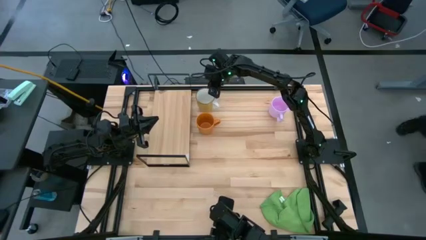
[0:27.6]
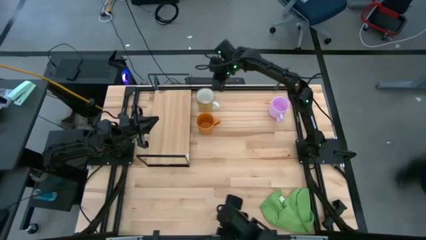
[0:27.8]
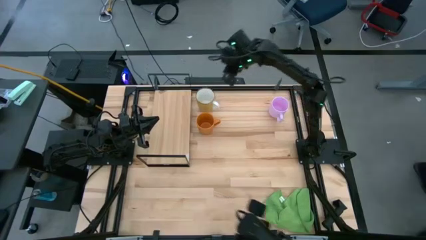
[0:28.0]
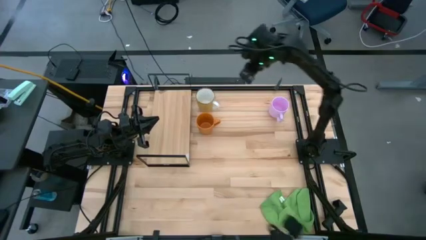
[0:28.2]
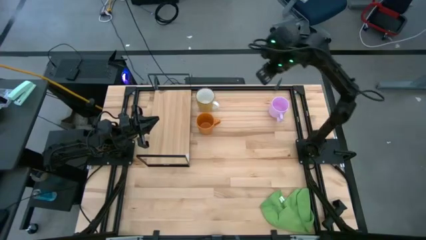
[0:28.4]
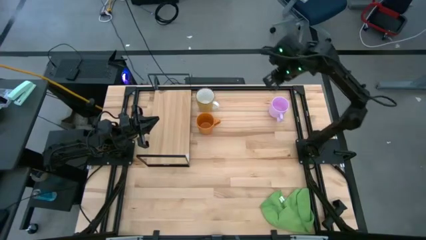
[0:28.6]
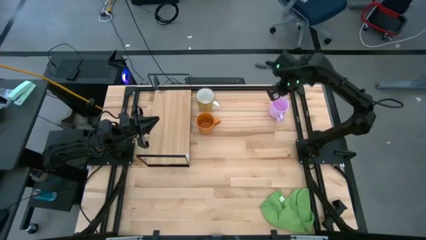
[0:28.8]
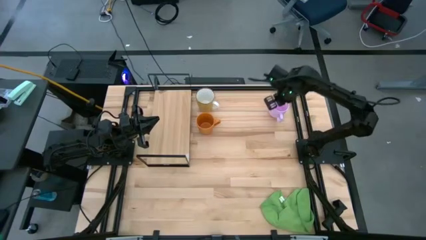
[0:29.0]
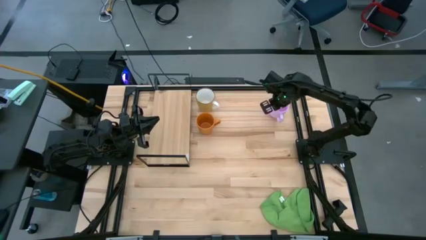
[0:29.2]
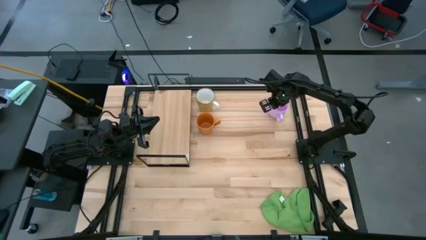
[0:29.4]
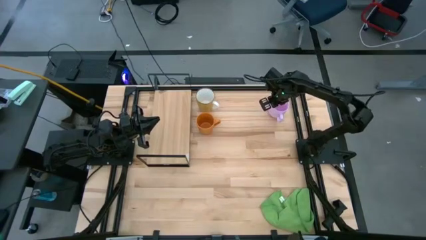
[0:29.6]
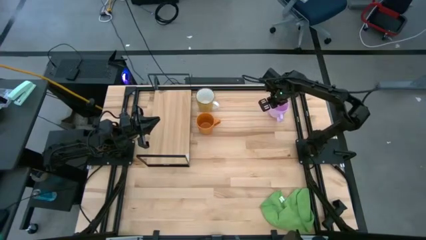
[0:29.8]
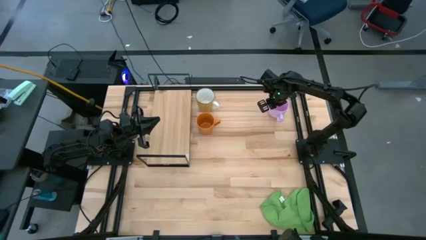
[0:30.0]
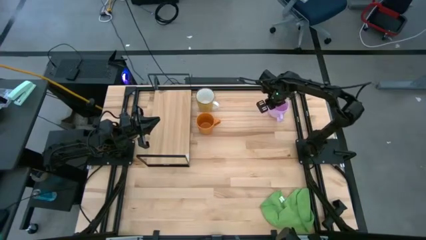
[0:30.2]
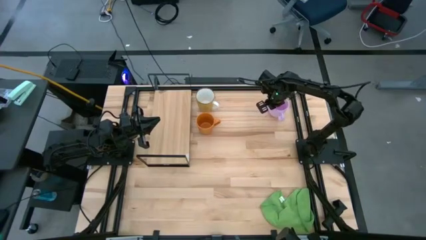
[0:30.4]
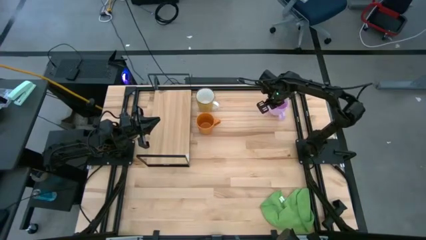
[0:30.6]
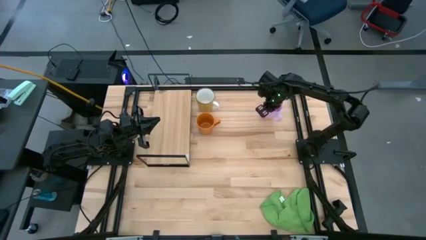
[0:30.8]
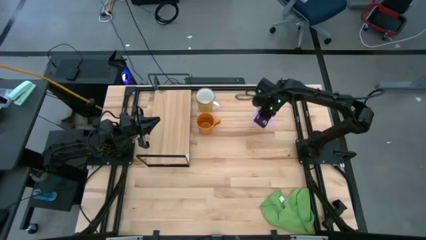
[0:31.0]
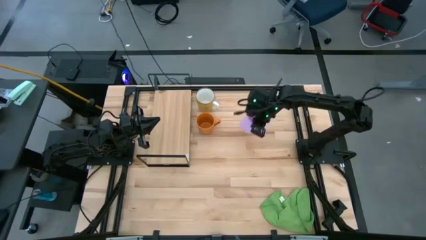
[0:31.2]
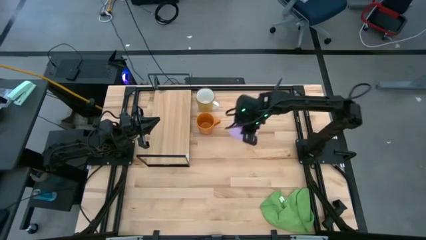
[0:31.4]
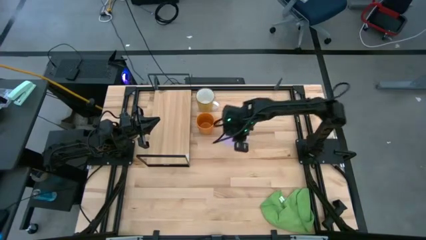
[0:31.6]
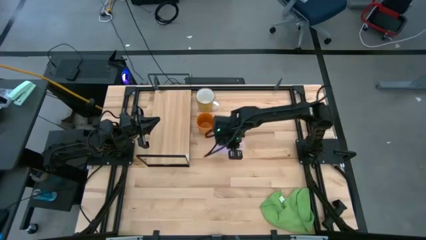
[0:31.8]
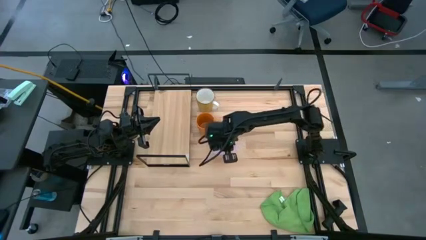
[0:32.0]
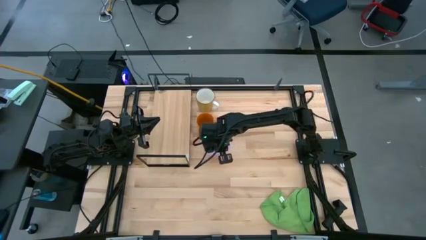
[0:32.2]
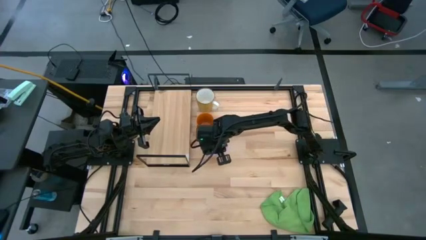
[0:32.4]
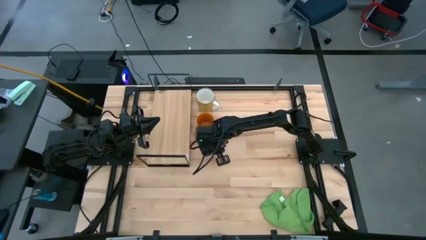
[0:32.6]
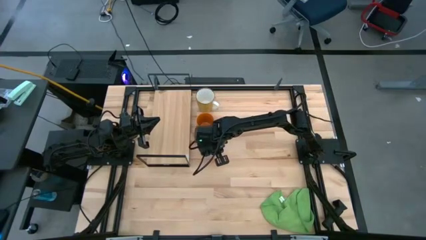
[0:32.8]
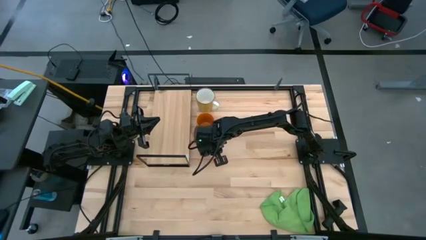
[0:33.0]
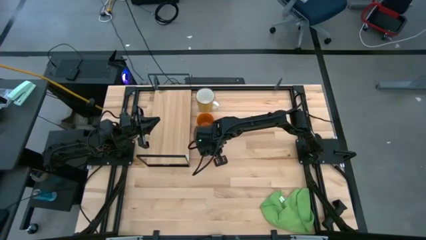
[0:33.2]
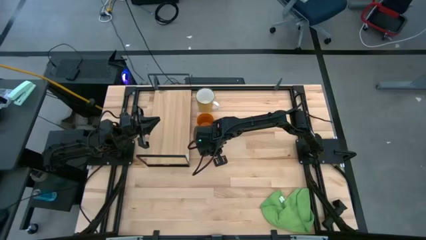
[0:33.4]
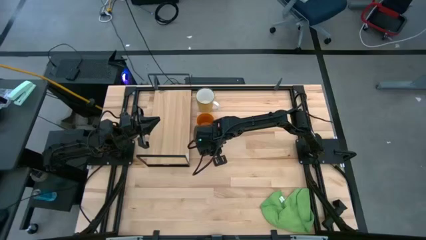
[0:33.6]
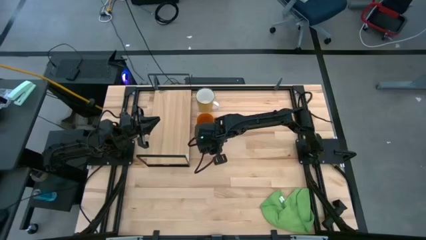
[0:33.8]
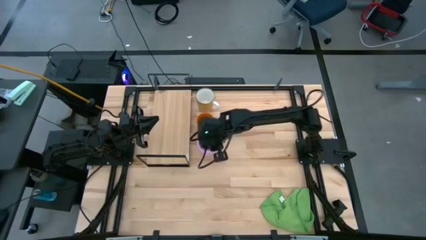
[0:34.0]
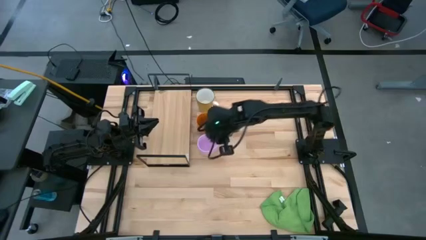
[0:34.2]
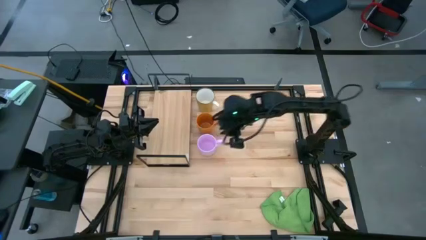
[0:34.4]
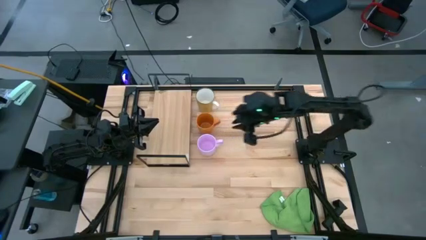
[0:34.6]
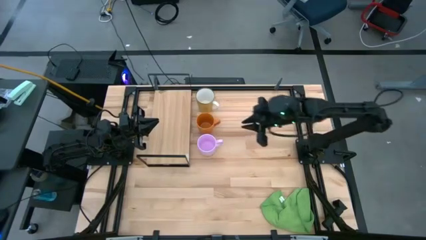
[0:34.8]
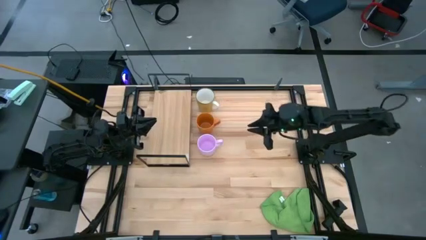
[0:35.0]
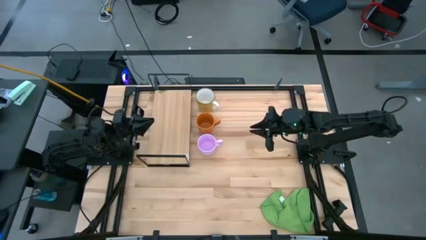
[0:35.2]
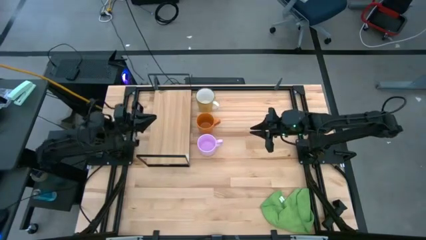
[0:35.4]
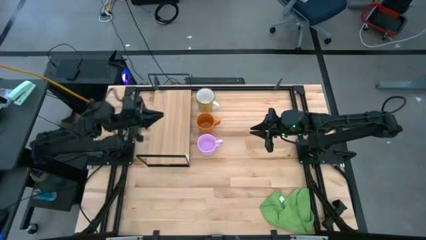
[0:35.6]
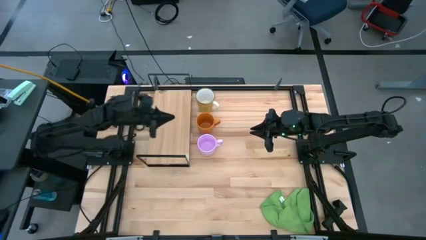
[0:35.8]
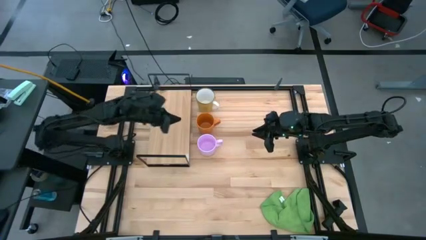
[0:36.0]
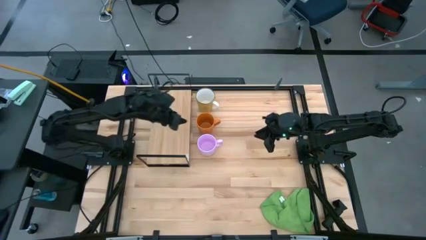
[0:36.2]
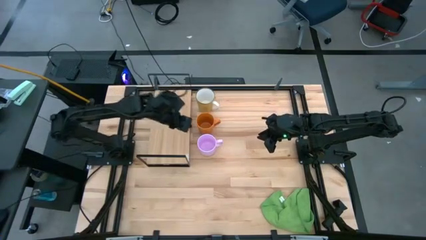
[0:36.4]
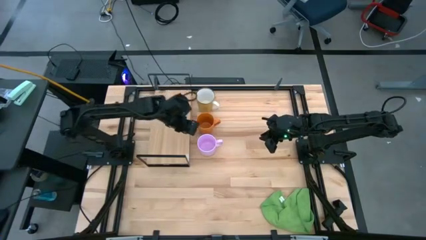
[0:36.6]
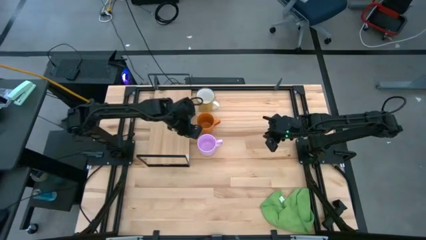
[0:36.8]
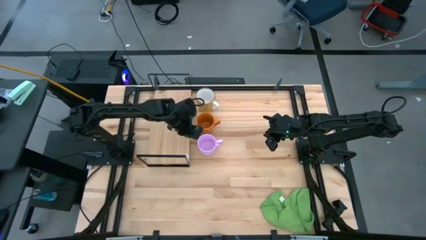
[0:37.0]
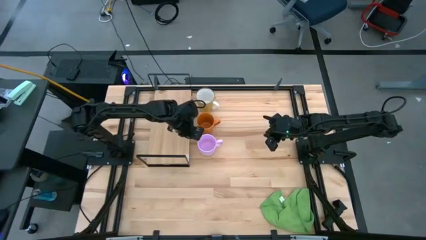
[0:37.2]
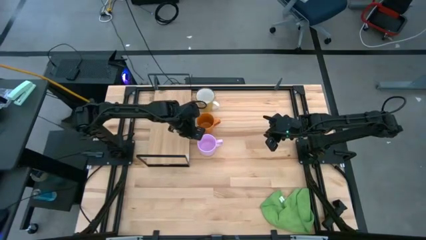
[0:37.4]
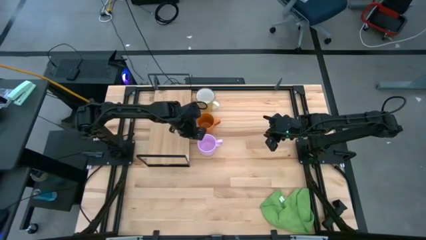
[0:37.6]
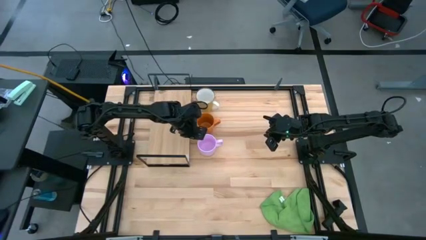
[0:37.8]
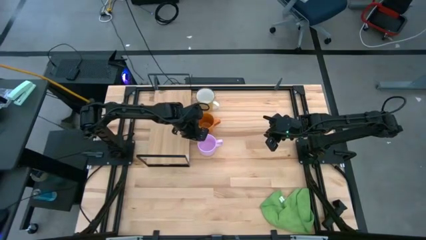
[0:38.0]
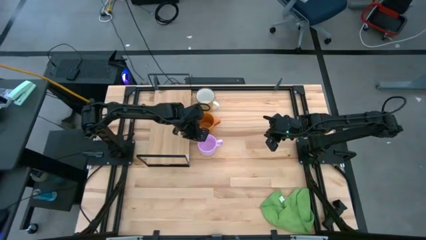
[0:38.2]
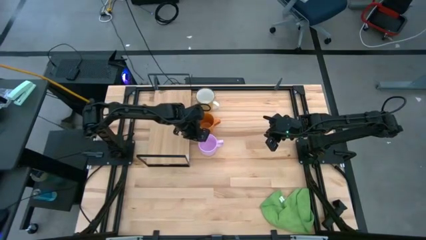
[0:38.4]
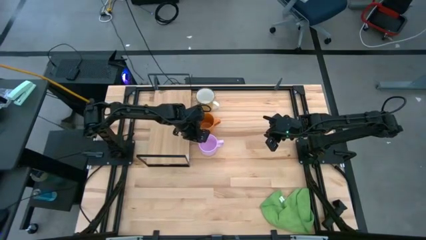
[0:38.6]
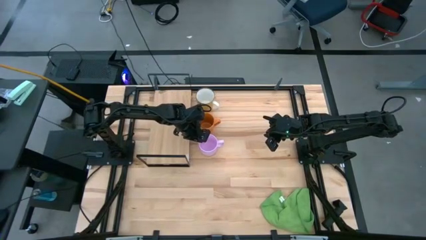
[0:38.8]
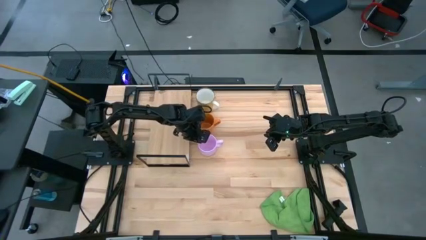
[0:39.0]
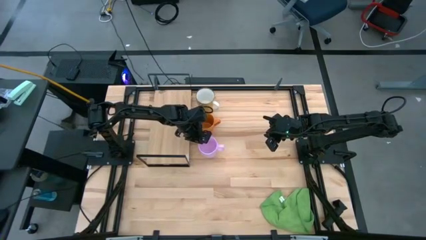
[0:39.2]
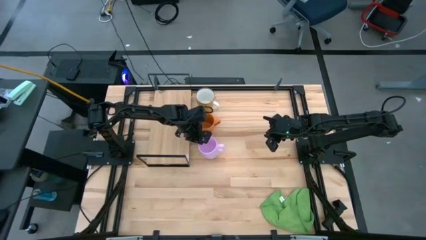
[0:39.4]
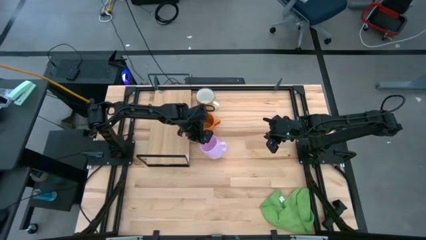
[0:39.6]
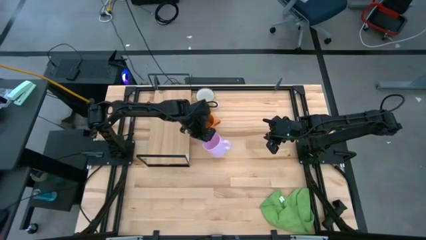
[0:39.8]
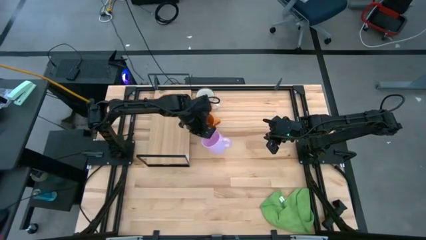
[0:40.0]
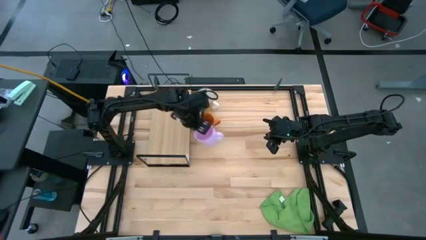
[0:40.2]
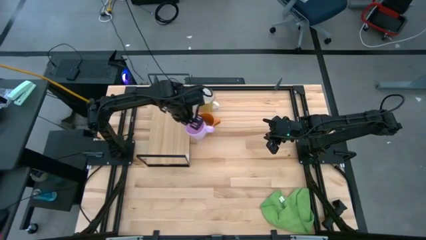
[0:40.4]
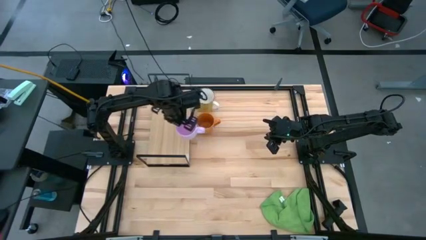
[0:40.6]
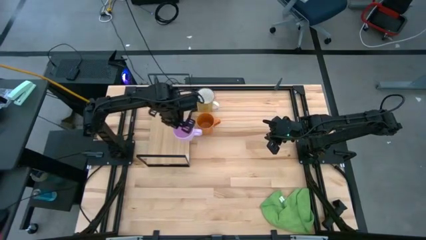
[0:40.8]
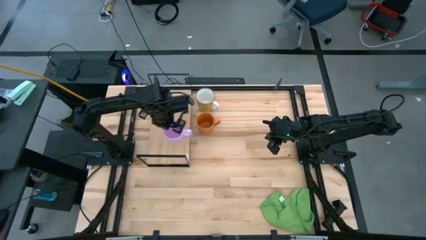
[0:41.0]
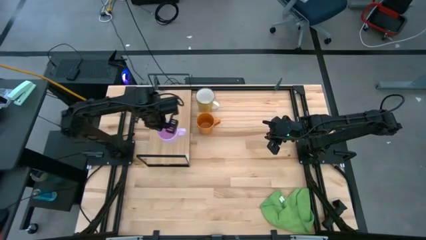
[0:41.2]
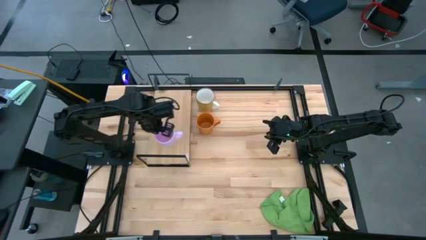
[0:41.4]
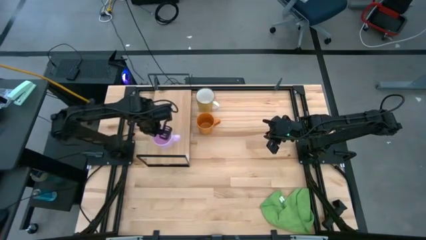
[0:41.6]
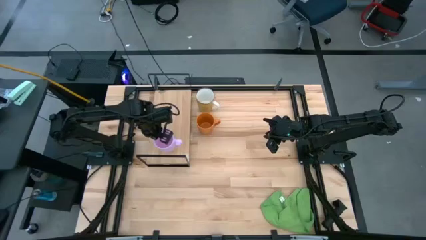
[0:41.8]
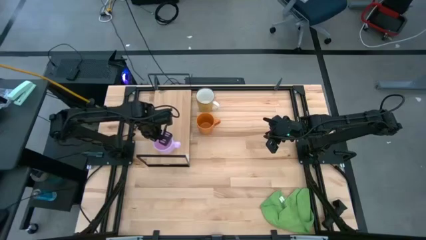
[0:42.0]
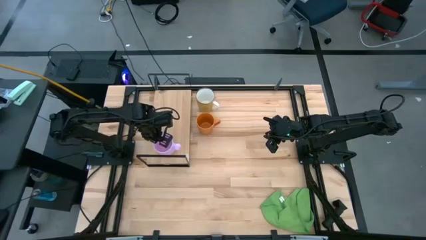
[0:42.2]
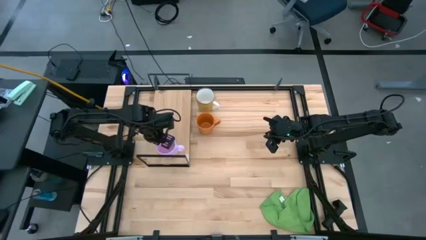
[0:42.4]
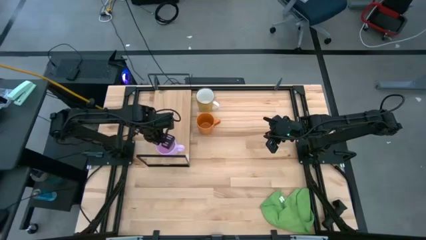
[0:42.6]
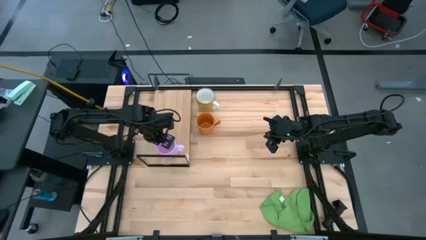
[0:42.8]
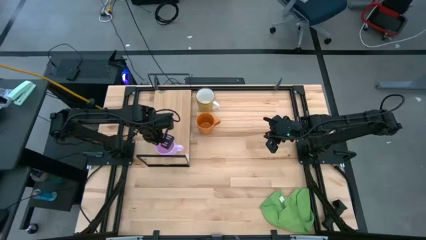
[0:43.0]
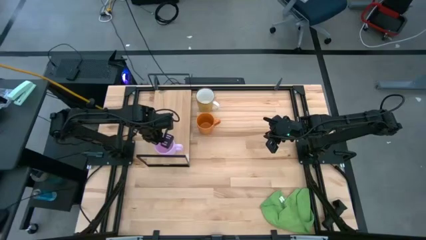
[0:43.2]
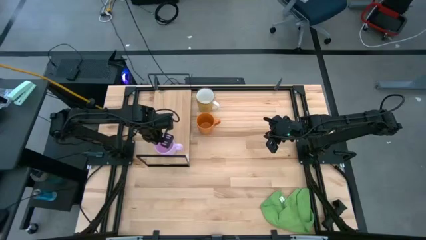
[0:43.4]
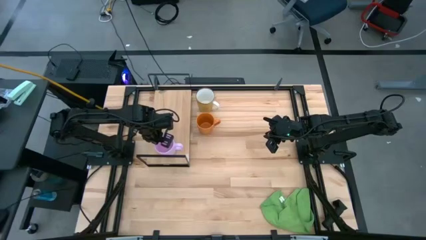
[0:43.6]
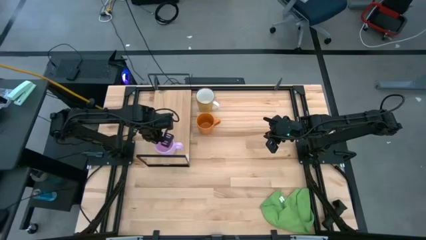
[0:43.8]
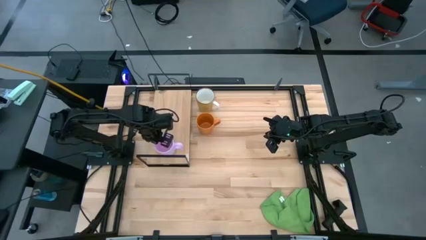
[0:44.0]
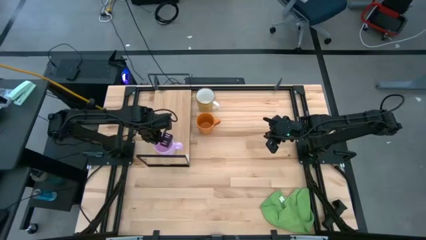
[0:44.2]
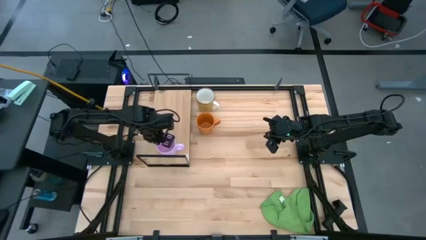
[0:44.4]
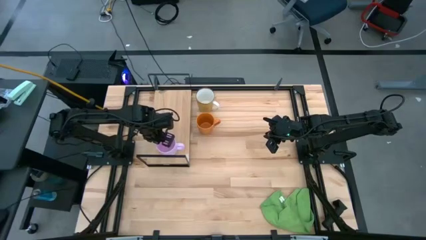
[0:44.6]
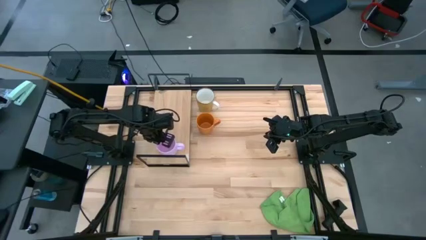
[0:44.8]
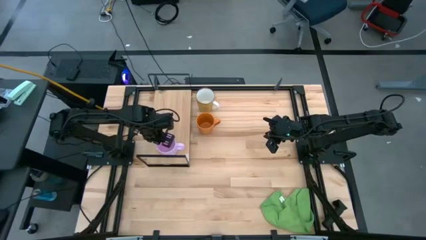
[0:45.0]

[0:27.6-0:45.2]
Task: Stack small to large cups/mugs on shelf
Put the pink mug on the shelf
